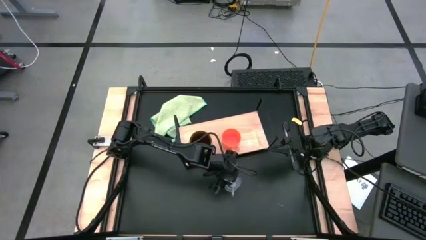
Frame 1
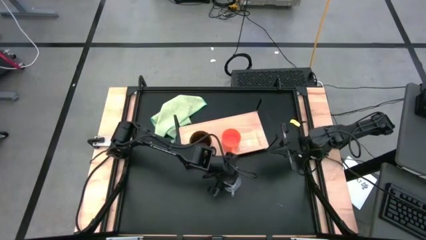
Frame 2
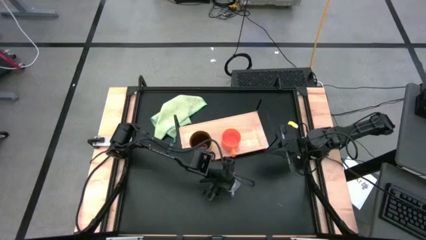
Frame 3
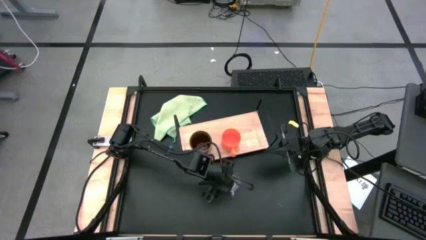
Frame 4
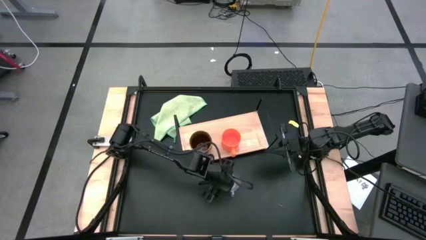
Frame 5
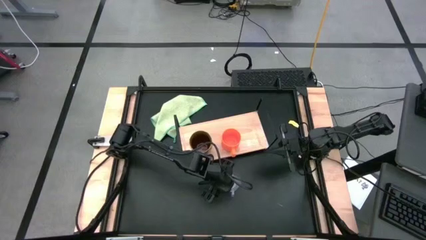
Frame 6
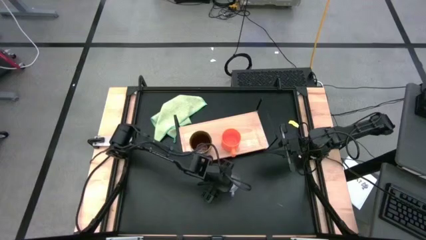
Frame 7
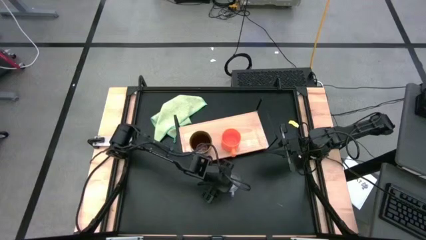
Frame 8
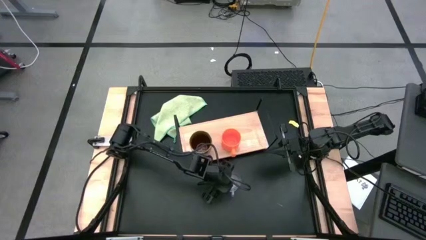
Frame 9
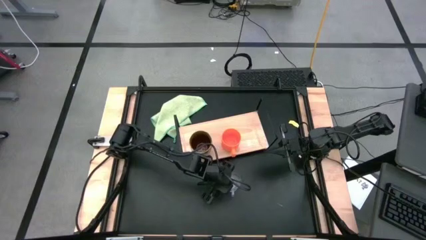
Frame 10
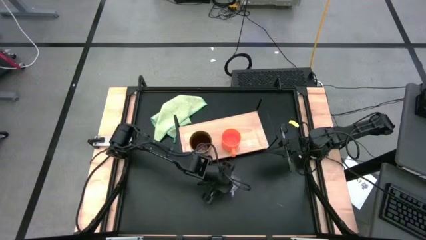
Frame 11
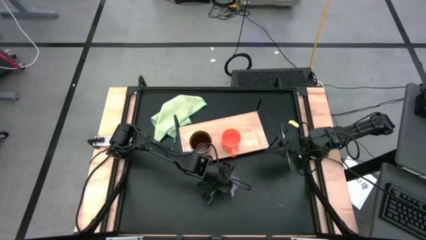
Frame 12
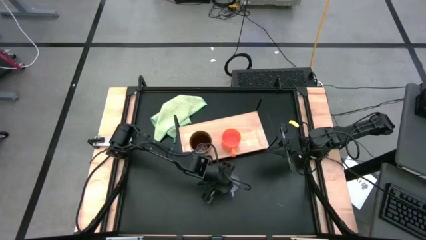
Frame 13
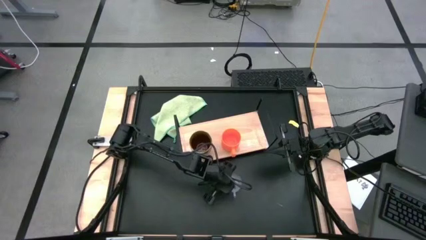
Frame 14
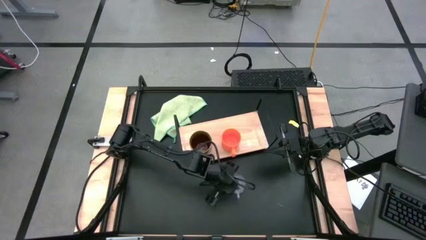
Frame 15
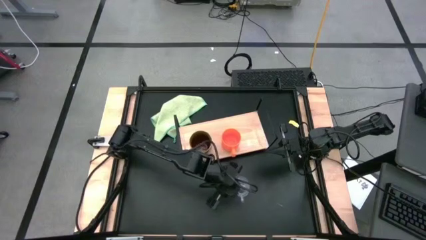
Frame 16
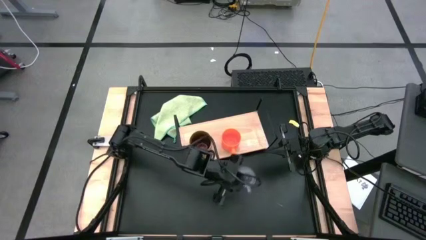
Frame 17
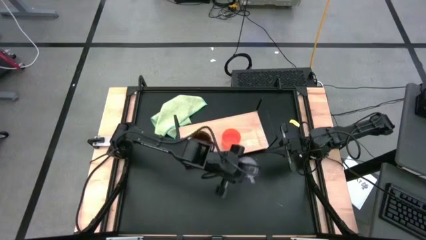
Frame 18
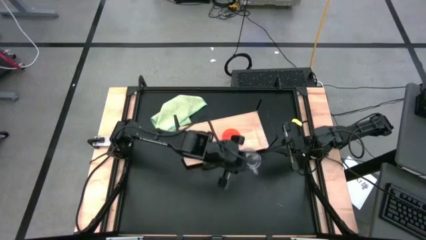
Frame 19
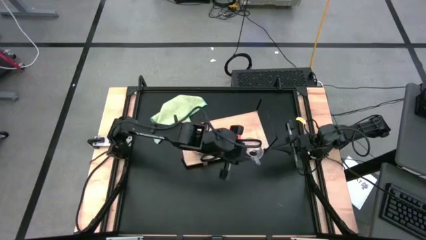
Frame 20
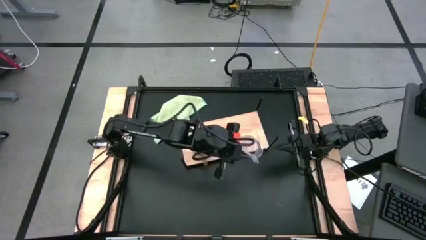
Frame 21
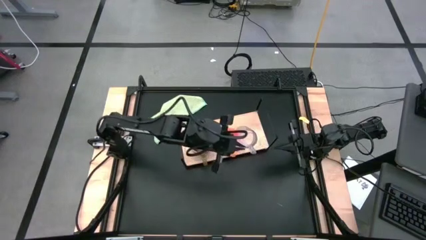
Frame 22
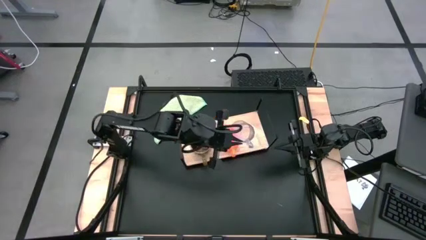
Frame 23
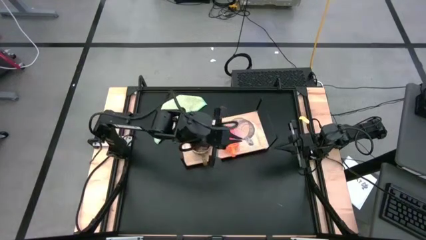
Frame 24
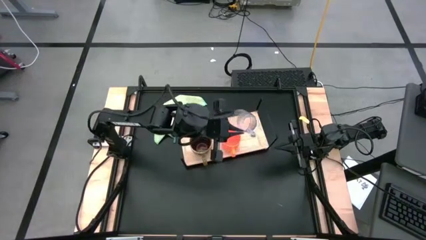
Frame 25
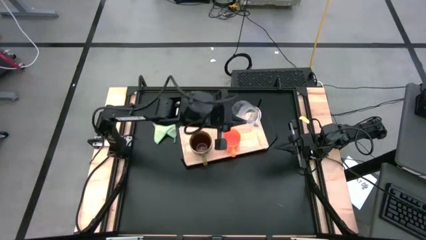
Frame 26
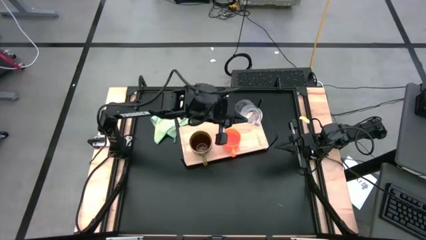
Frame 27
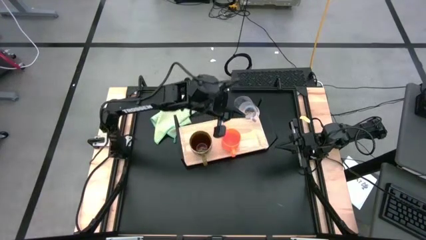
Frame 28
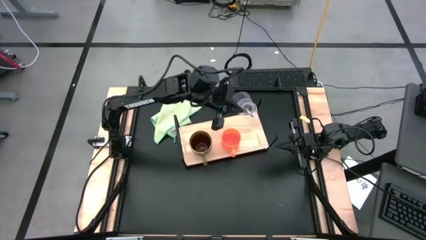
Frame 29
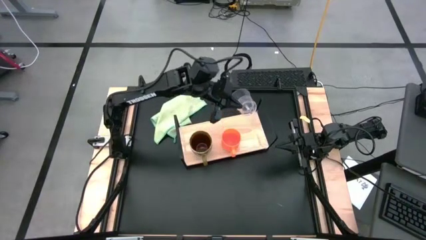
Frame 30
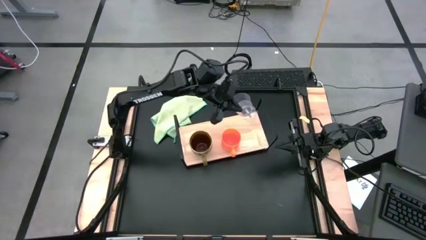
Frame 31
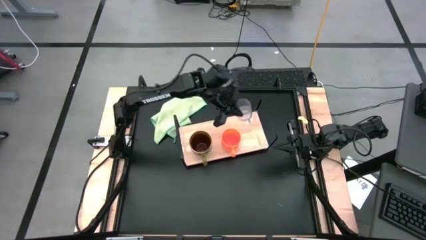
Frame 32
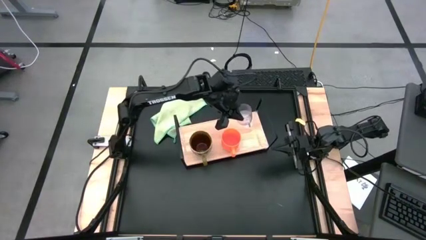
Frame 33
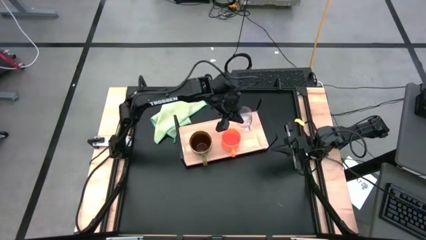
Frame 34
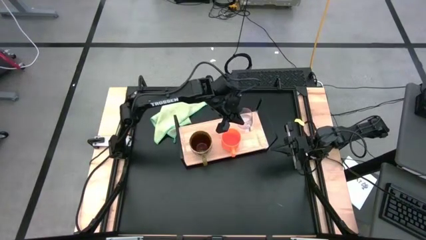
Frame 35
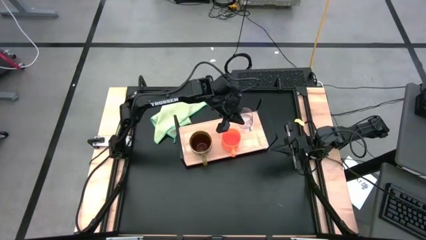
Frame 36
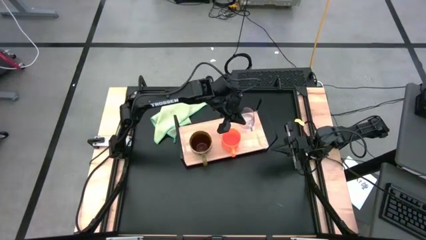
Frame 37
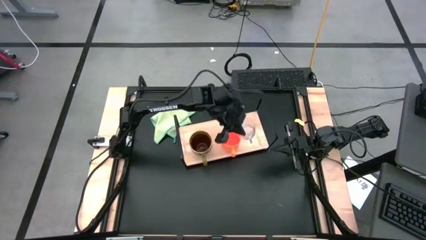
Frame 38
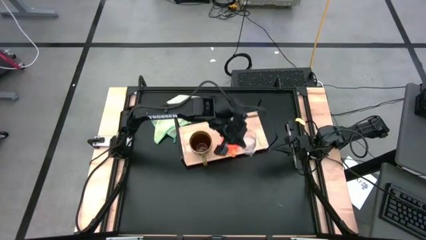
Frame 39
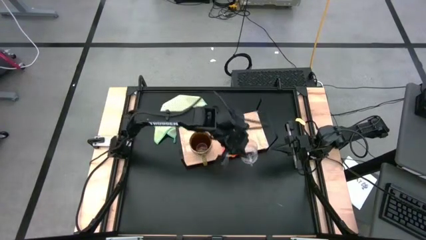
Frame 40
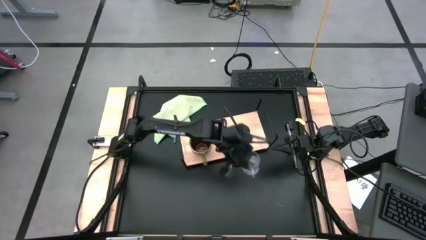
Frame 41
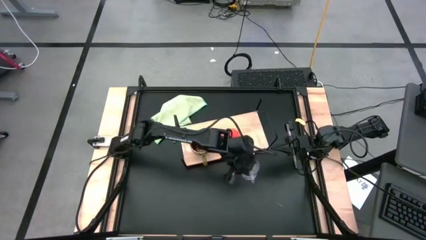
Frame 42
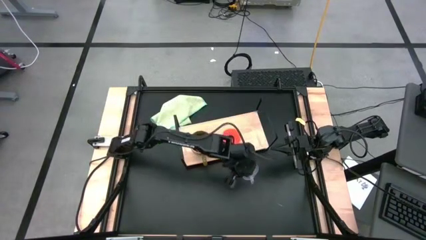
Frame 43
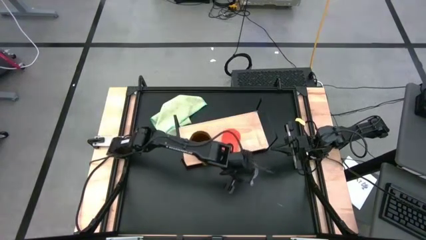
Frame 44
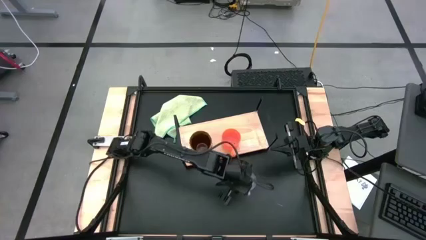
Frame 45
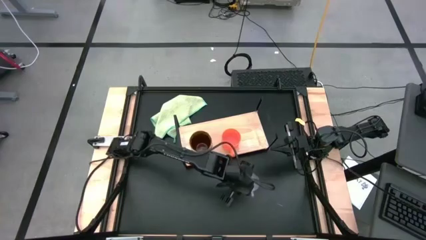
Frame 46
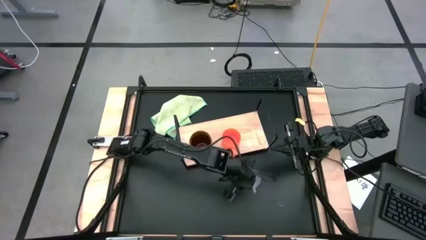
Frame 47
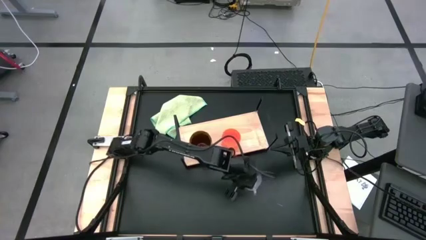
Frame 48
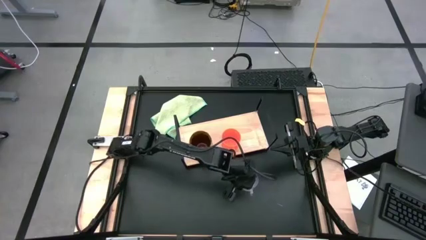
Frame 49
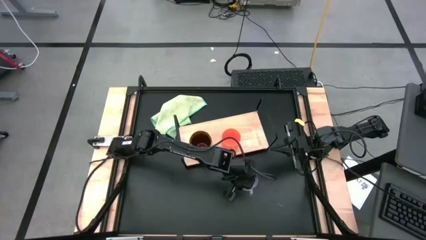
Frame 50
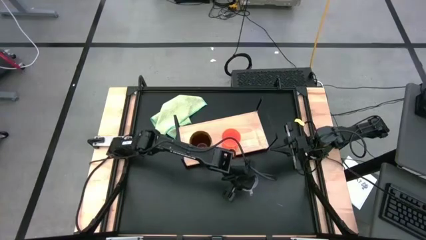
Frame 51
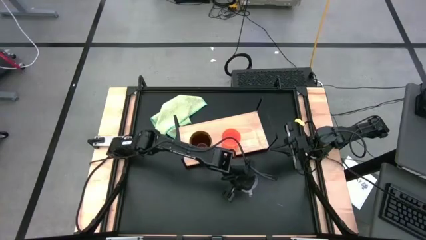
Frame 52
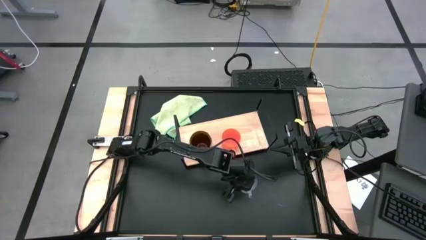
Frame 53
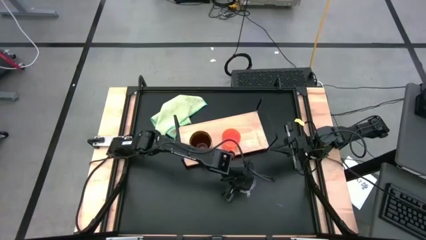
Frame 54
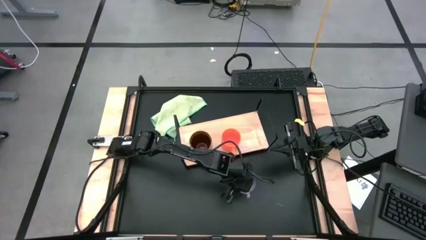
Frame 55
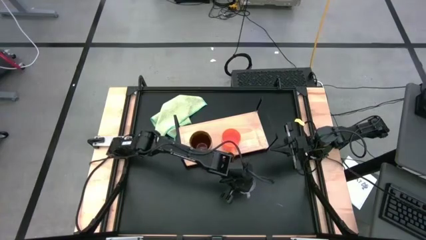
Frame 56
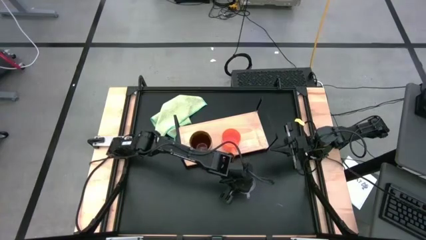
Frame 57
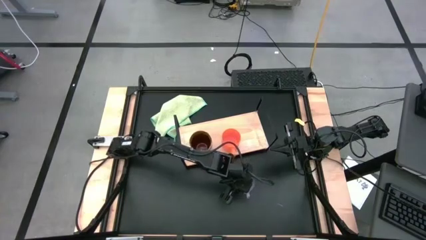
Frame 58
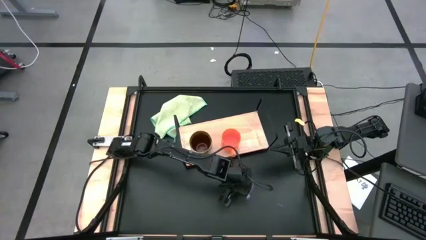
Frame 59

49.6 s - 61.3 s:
Task: Stack small to large cups/mugs on shelf
Put the transparent mug on the shelf

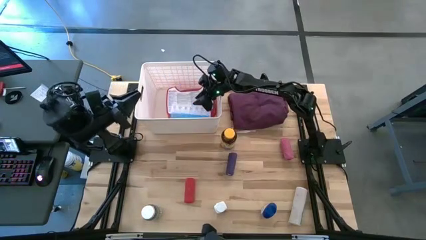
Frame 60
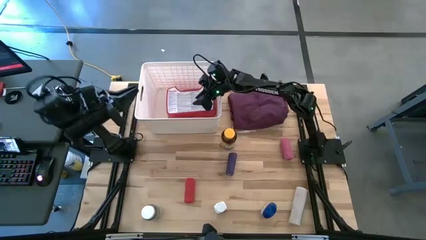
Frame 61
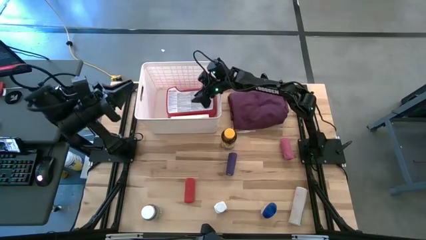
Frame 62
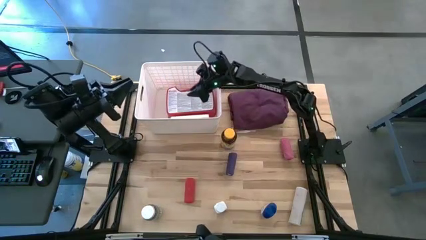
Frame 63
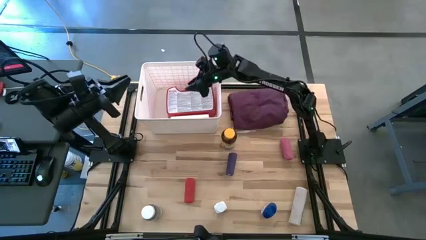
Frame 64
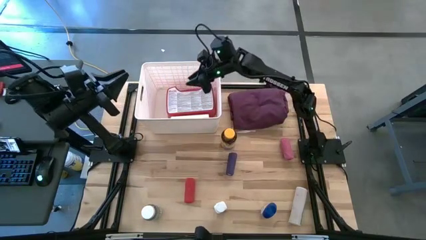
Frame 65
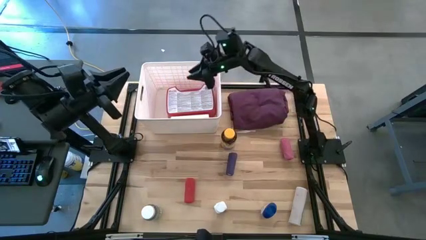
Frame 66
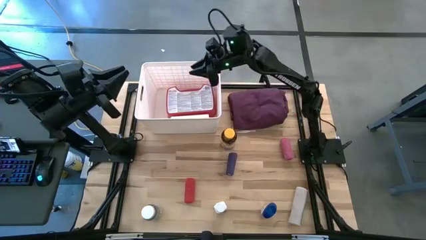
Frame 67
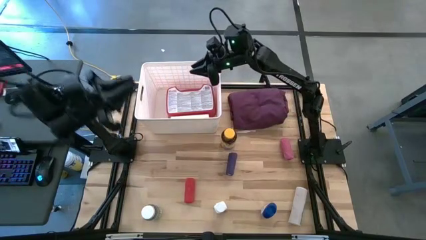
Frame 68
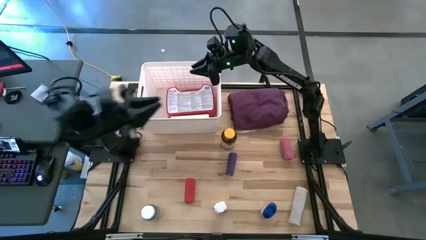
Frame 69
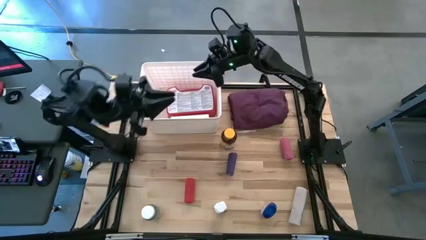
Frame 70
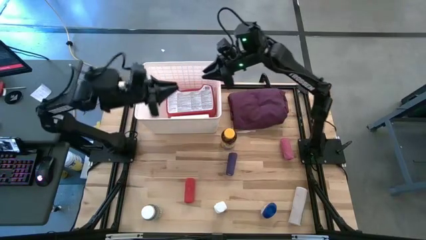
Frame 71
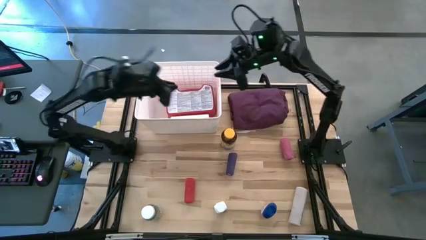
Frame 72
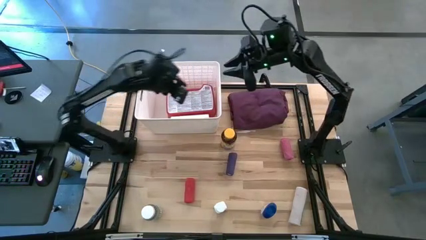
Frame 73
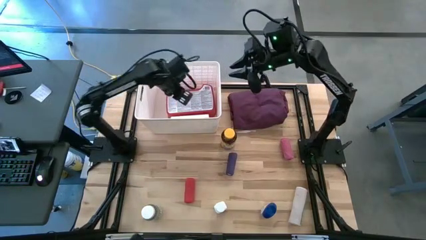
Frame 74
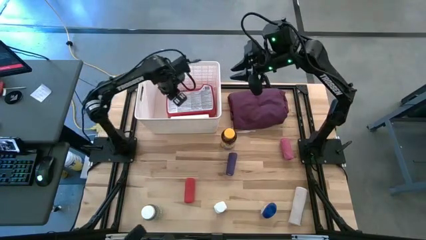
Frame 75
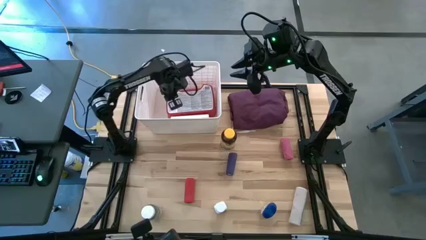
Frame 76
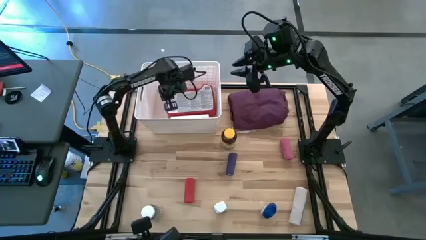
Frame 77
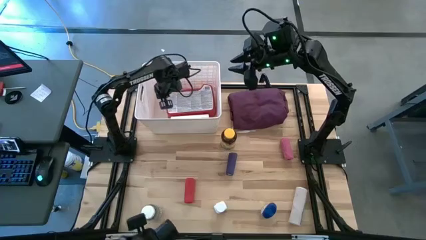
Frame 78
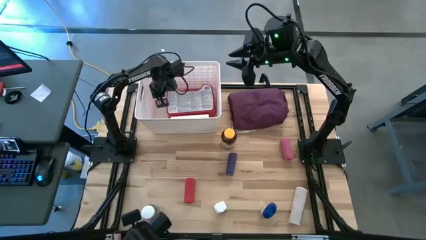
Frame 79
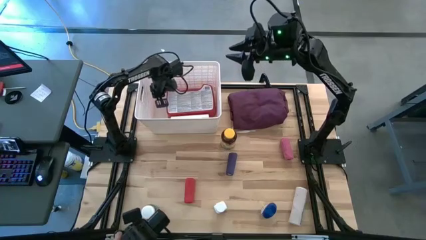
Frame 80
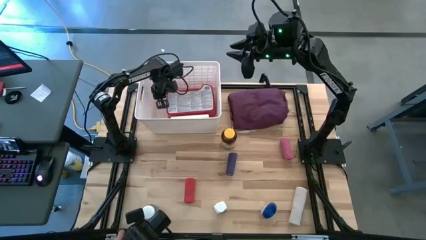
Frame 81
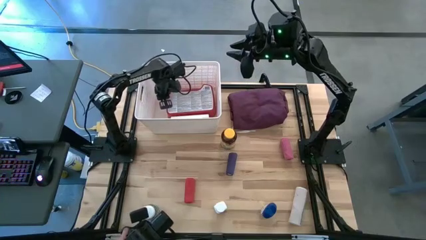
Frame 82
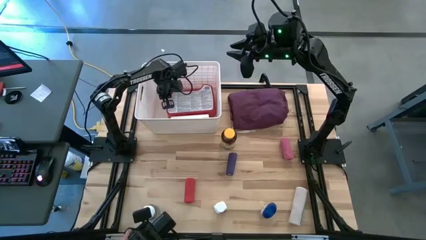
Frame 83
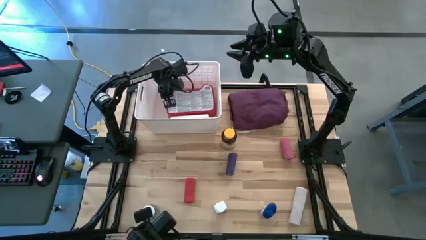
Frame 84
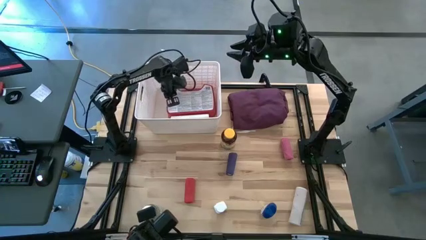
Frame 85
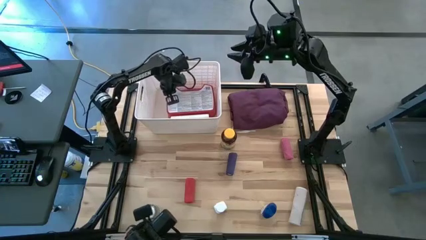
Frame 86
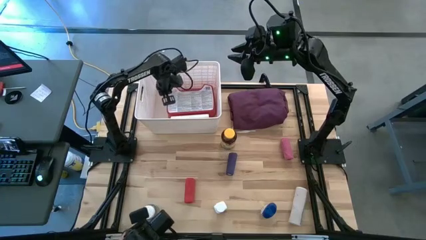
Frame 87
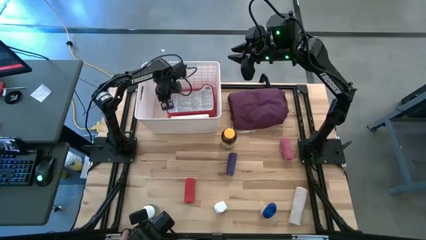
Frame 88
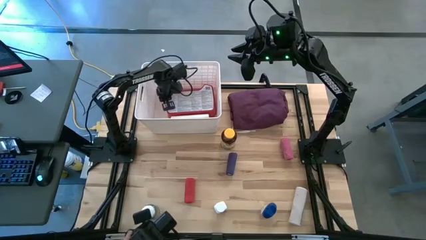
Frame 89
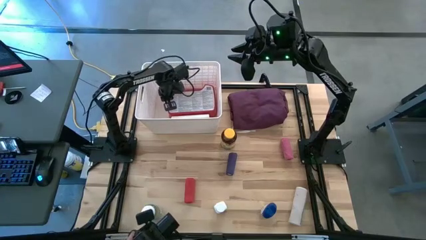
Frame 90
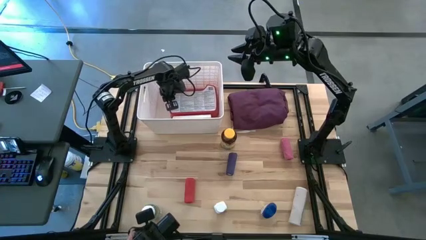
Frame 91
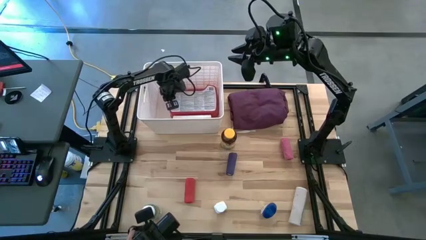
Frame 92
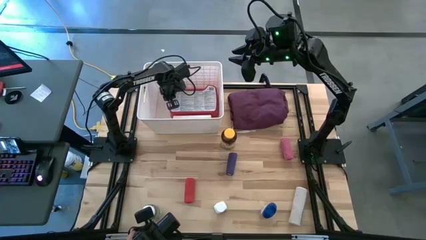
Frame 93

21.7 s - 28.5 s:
Task: Pick & place medical supplies in basket/bin
Adjust the red first aid kit in the white bin
